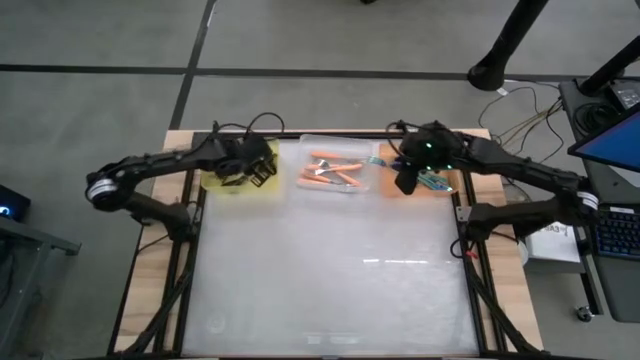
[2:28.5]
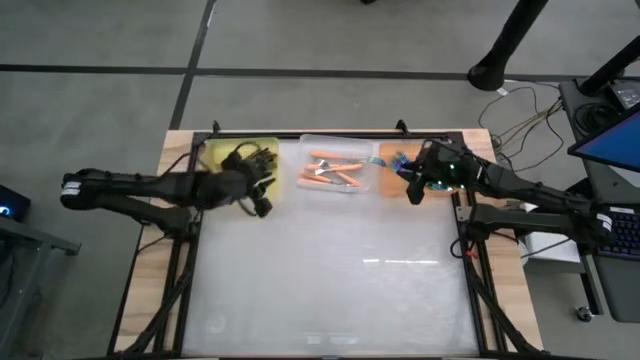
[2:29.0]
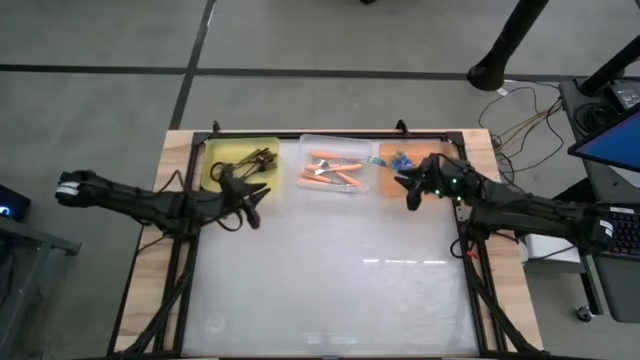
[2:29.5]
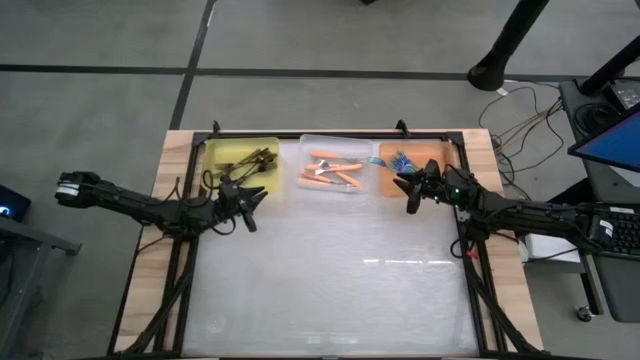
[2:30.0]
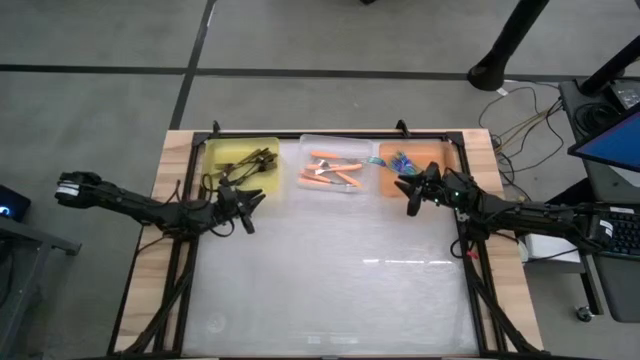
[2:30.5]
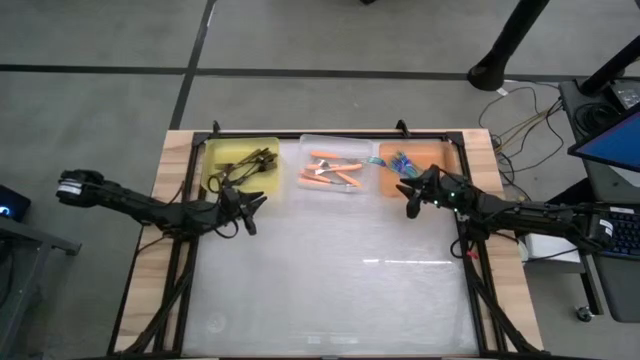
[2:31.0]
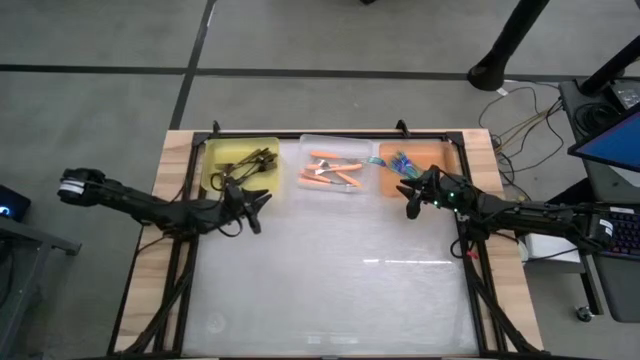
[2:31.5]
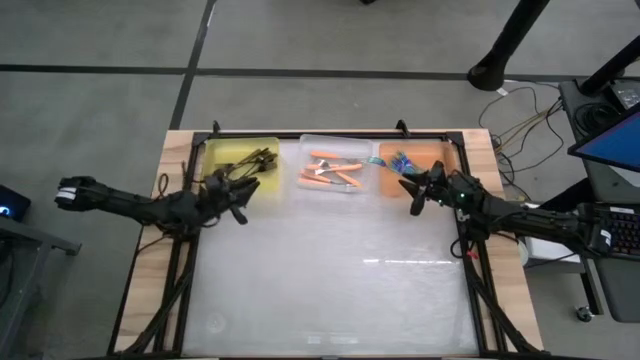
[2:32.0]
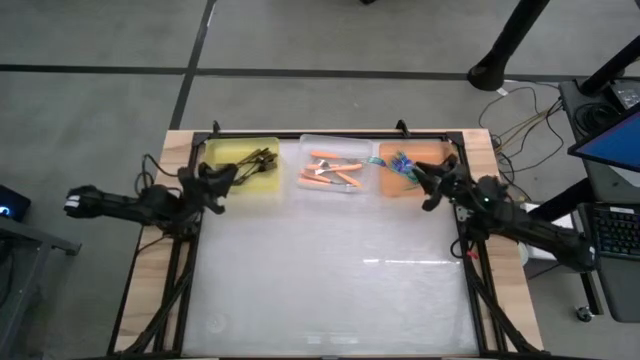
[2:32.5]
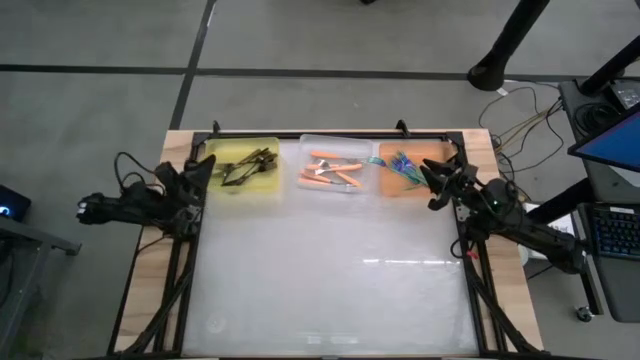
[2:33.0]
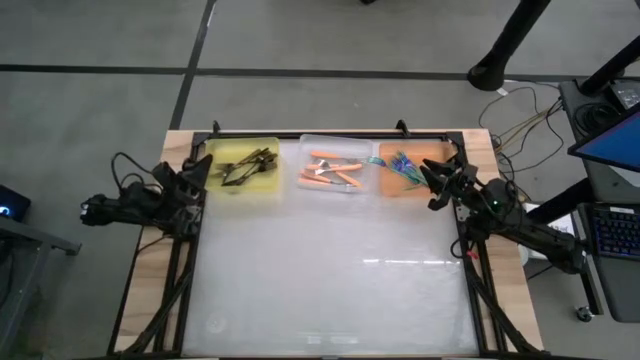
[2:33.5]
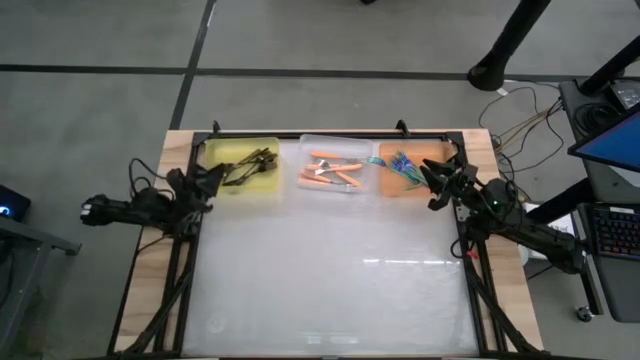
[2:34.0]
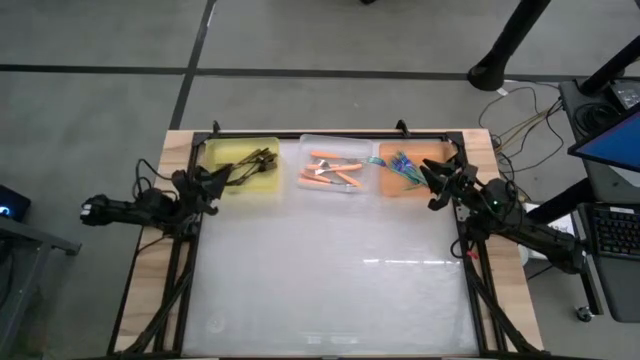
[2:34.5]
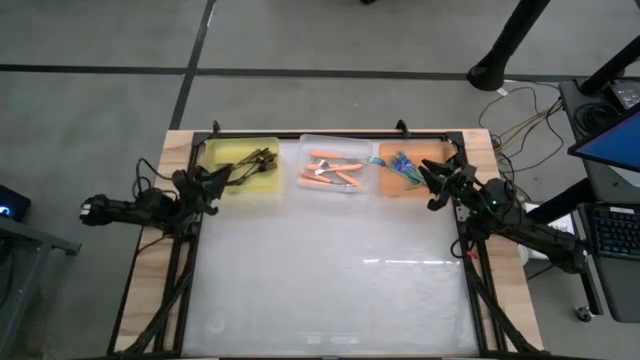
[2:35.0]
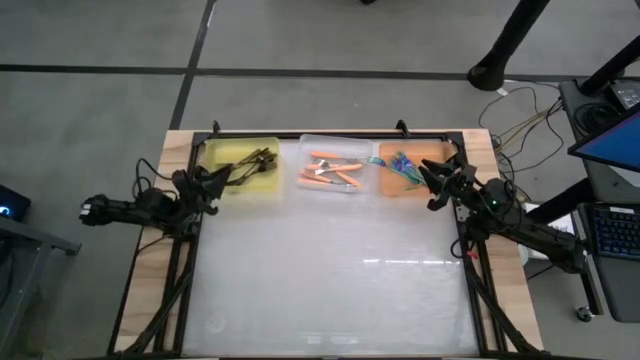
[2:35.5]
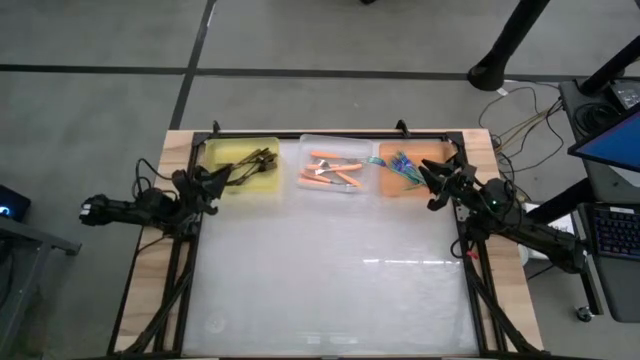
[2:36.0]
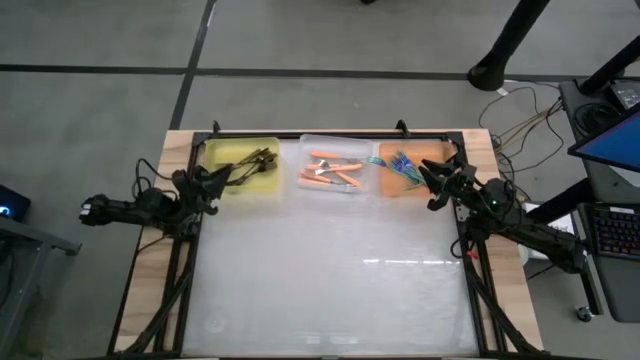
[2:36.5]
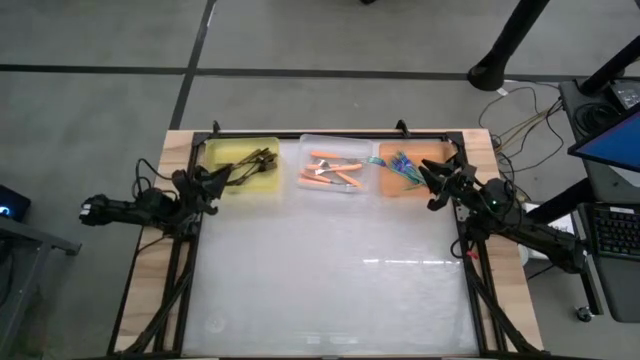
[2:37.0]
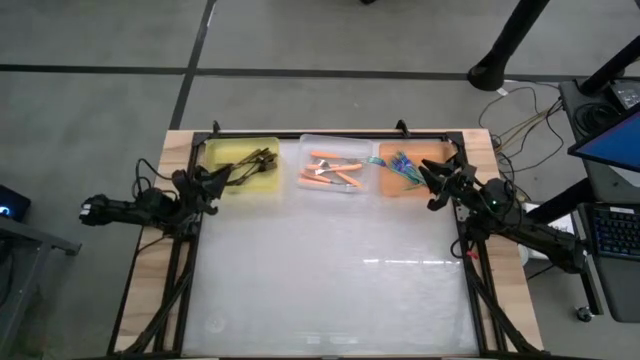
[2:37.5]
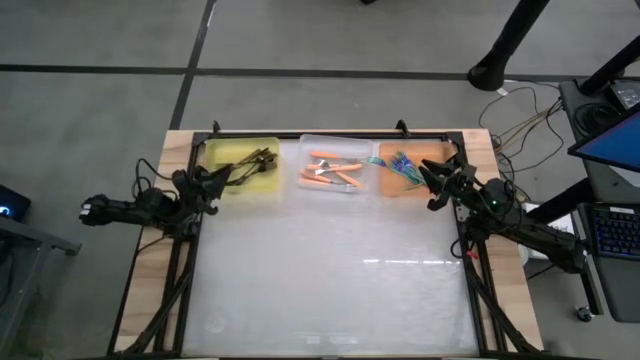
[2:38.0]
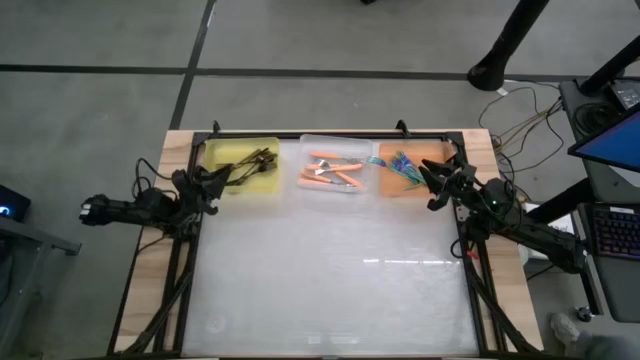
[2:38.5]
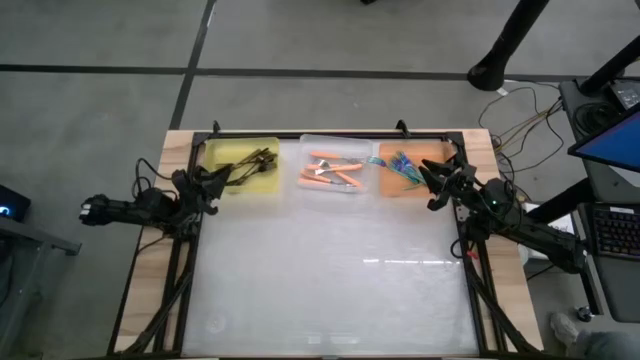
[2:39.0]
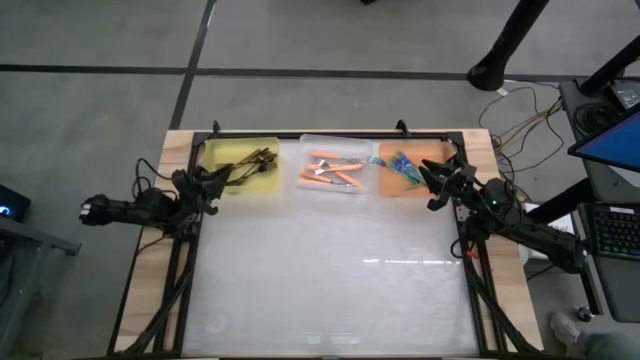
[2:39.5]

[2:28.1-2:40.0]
Task: Sort silverware by color (type)
Return to Home Position

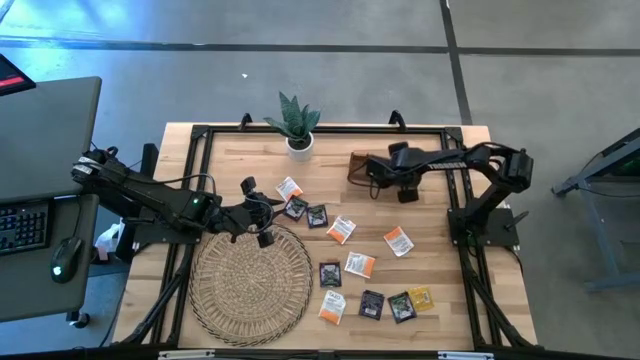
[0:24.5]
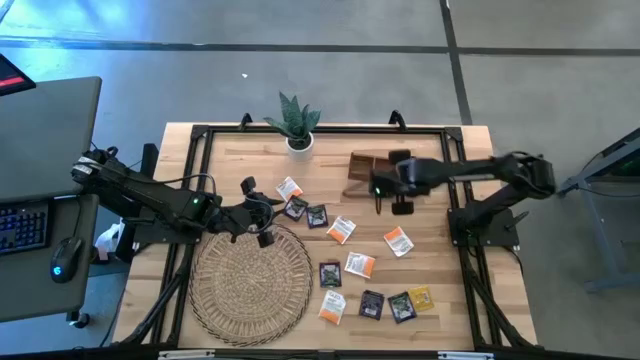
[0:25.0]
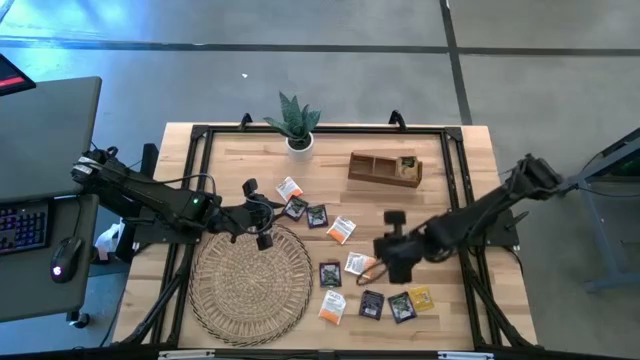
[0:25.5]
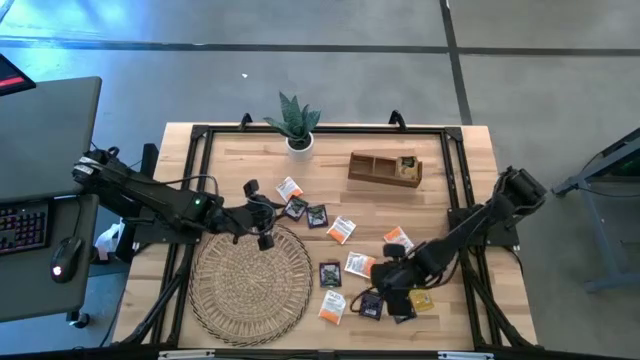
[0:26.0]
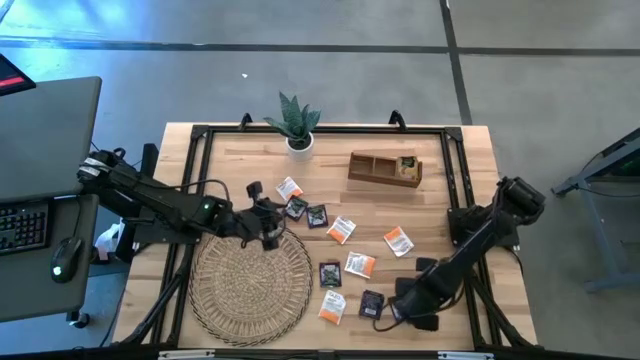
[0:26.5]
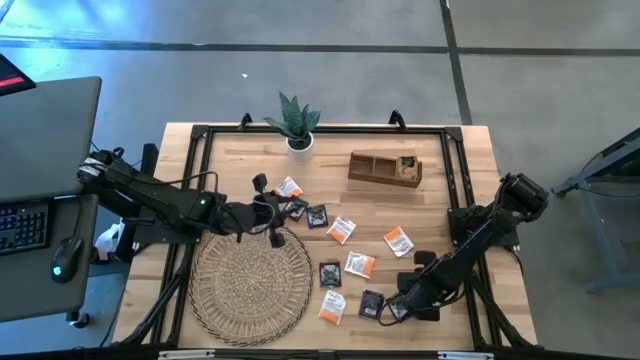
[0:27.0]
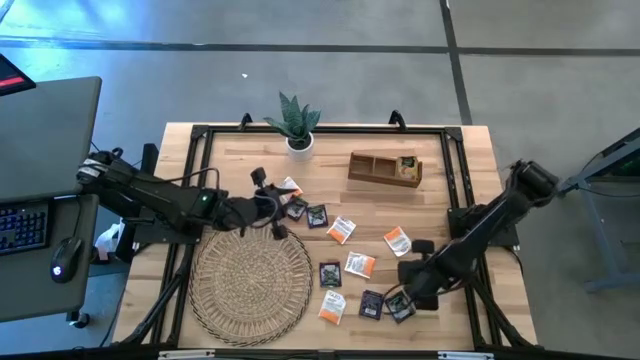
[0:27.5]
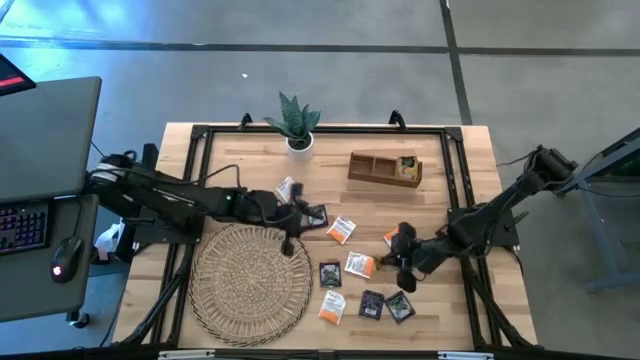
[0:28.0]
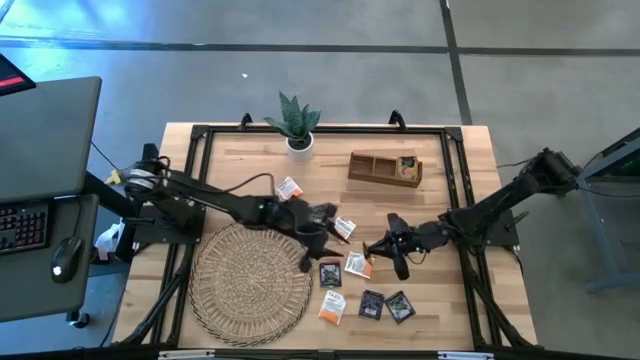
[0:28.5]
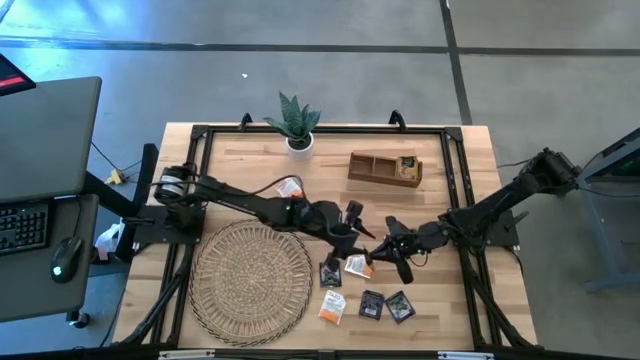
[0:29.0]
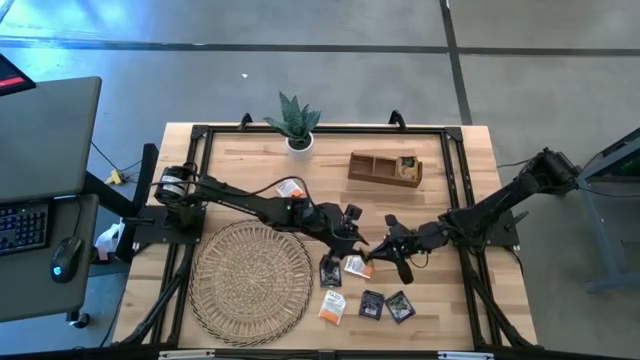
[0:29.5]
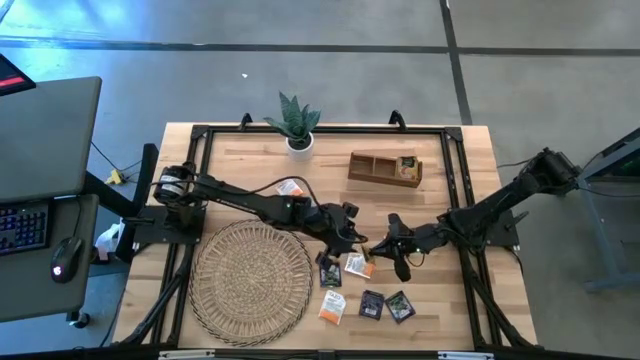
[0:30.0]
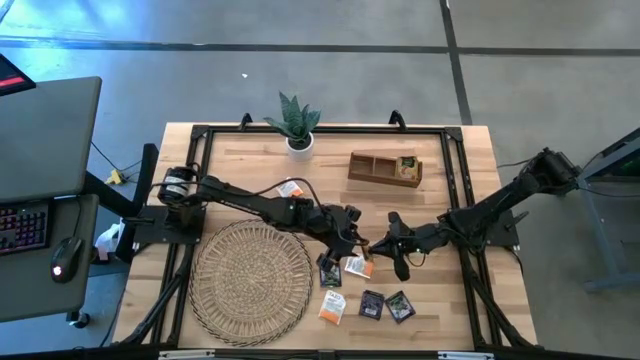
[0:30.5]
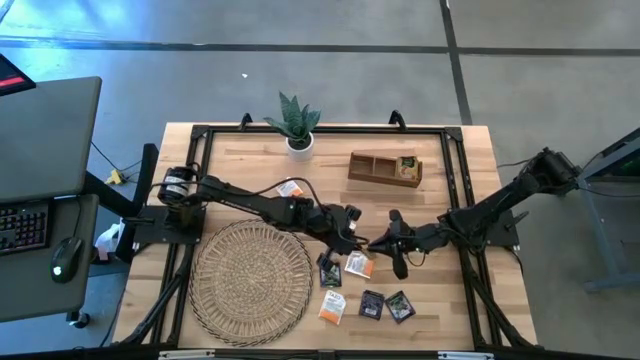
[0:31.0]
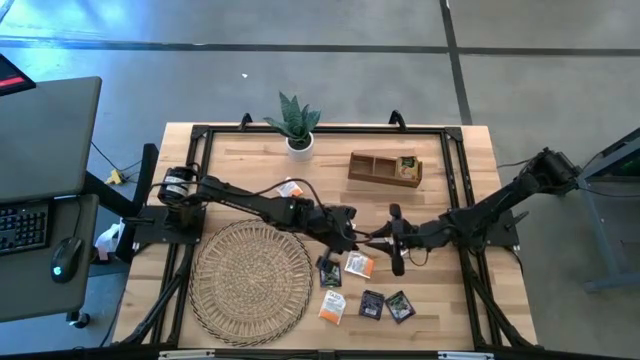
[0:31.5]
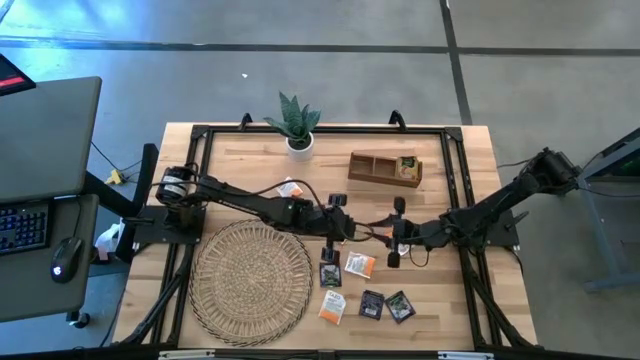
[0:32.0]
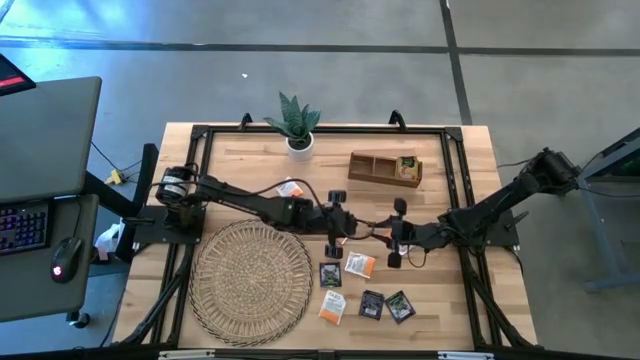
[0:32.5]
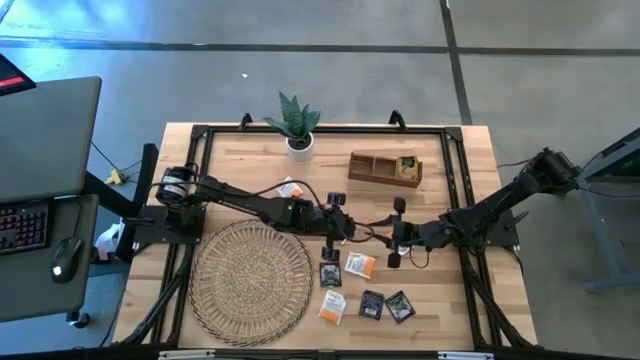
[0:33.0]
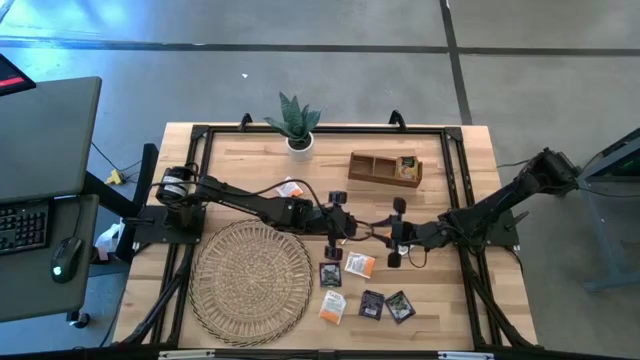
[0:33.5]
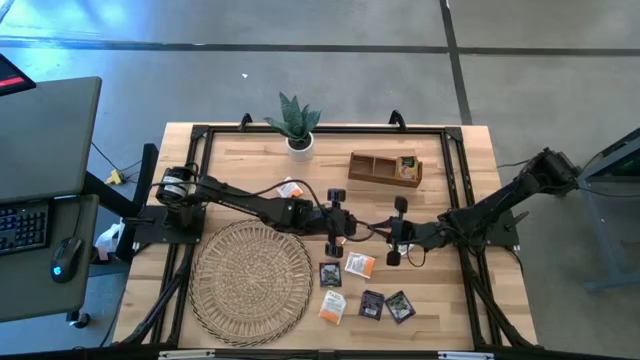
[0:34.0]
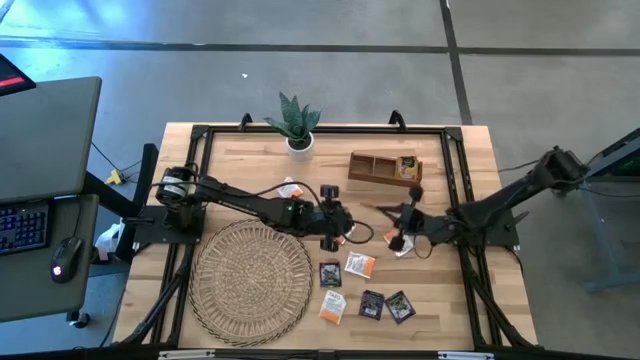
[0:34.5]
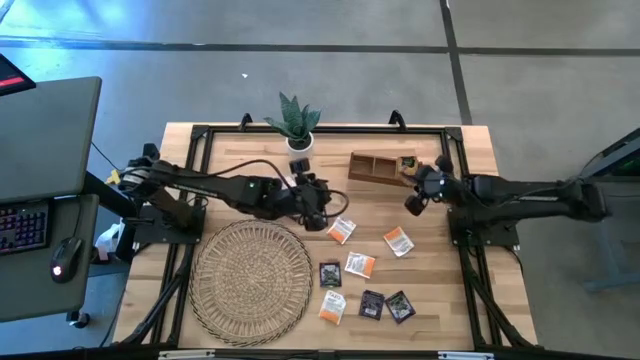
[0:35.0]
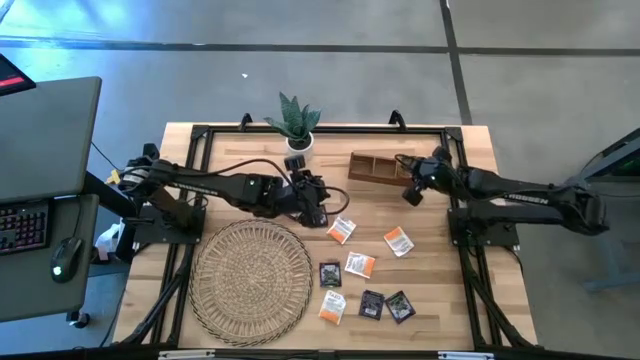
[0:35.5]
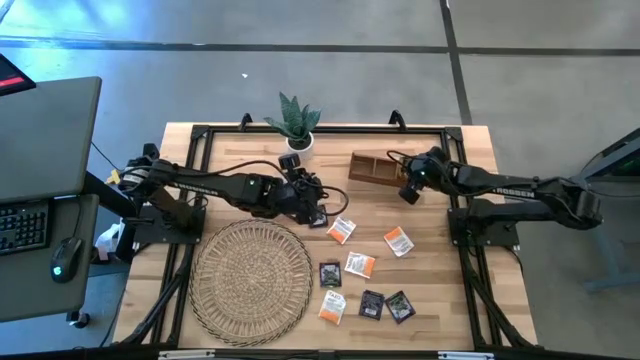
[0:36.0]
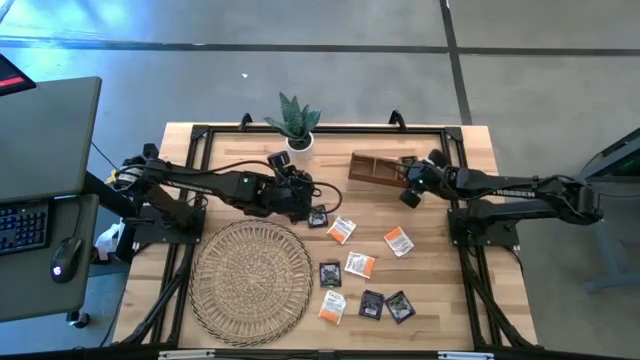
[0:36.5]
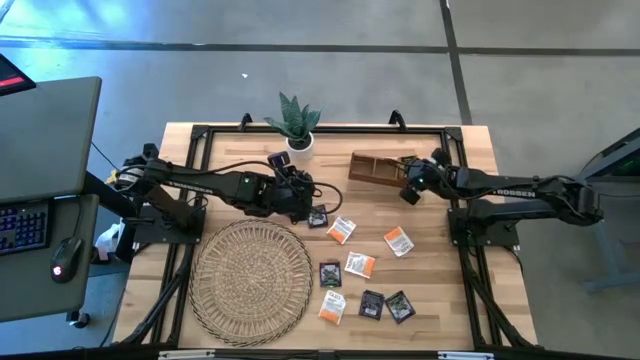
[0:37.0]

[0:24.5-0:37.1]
Task: Pick & Place Tea
Put the orange tea bag into the right section of the wooden organizer
